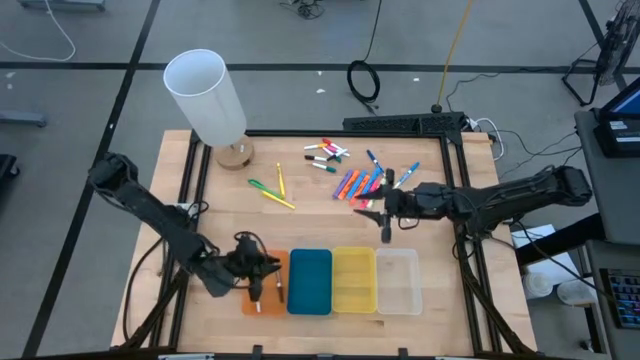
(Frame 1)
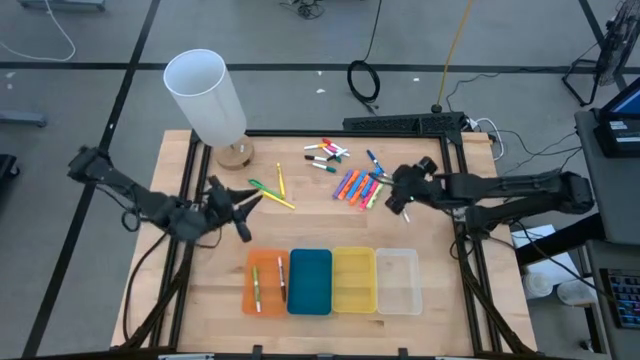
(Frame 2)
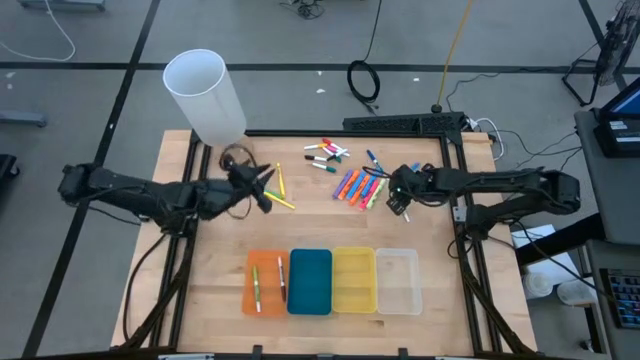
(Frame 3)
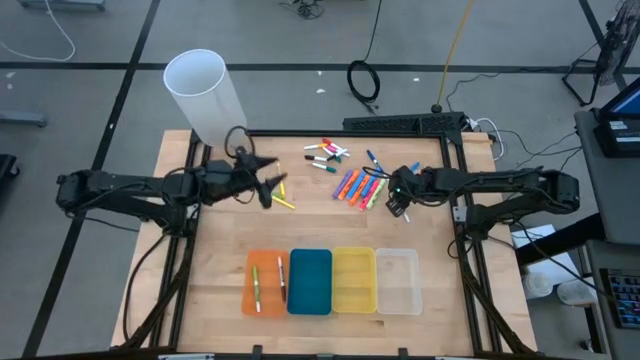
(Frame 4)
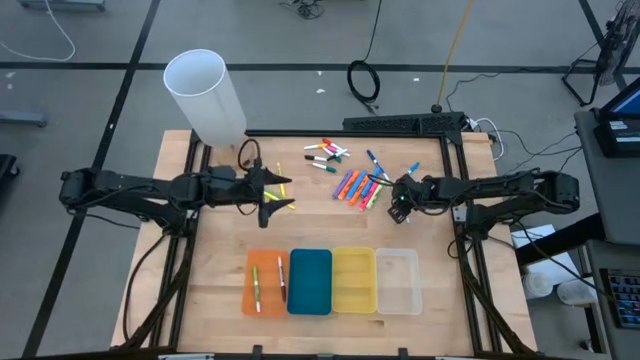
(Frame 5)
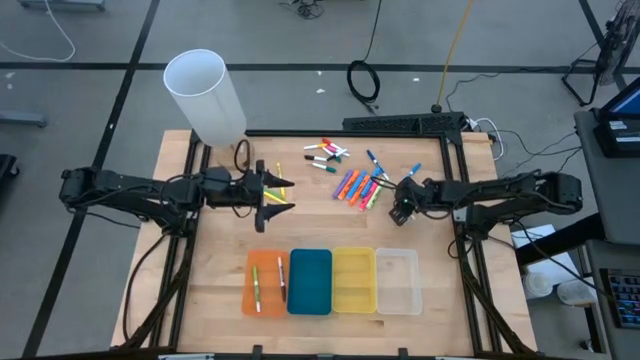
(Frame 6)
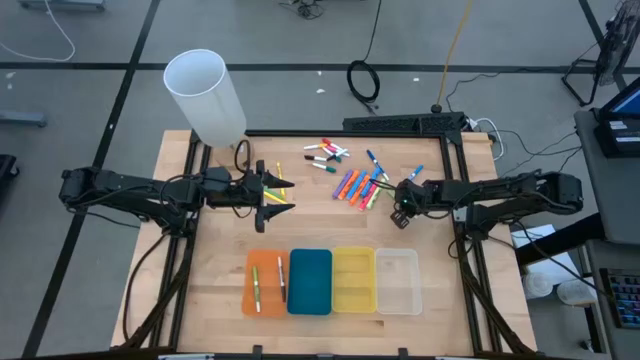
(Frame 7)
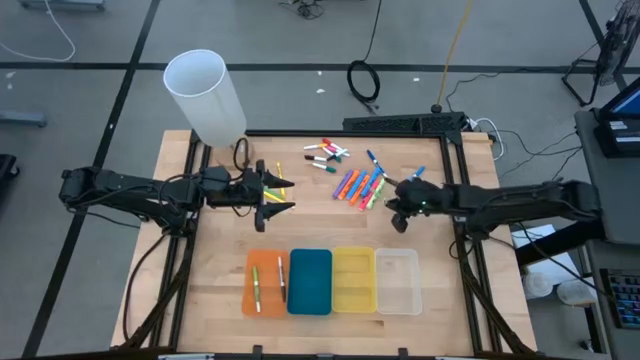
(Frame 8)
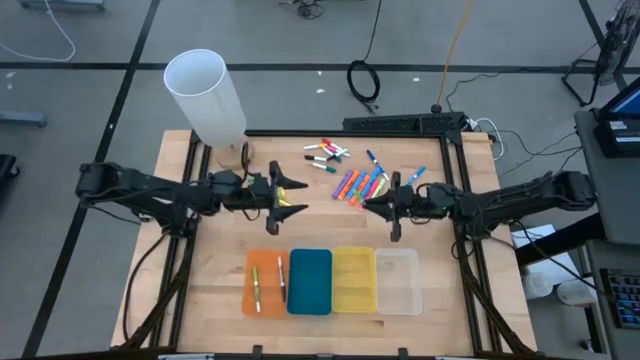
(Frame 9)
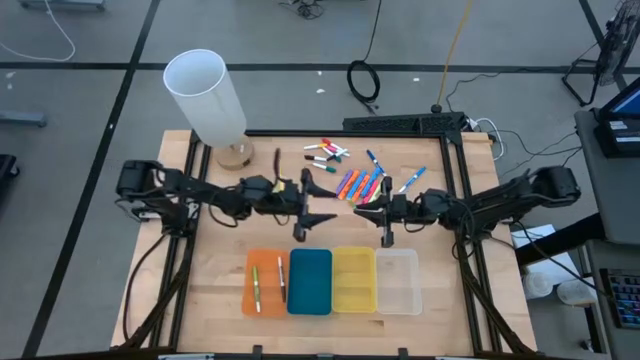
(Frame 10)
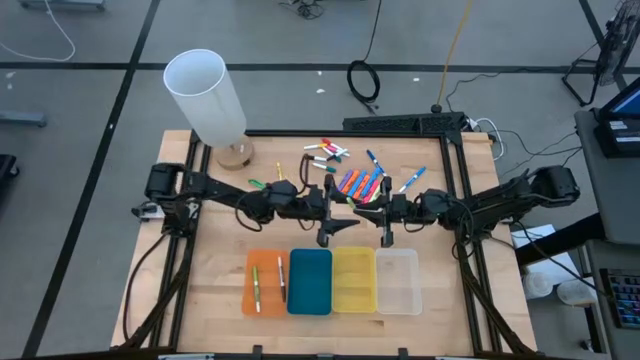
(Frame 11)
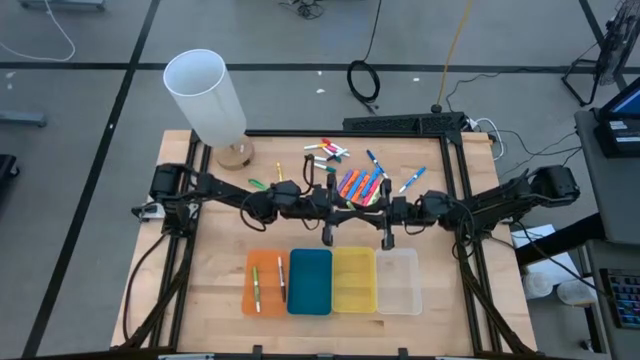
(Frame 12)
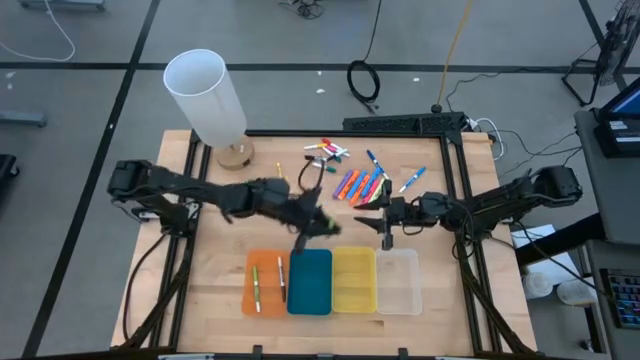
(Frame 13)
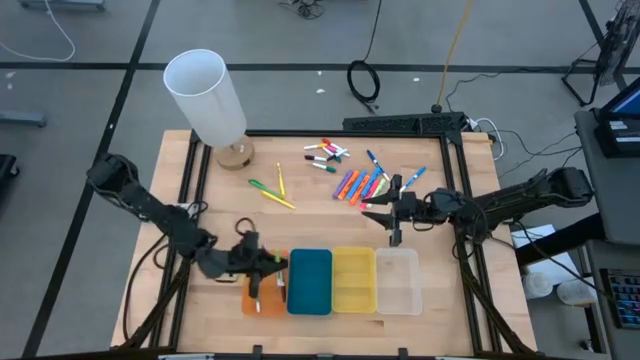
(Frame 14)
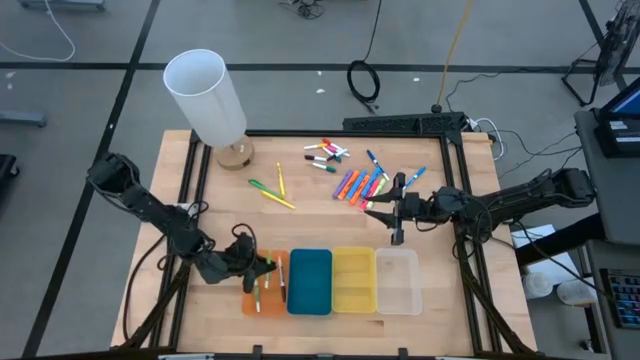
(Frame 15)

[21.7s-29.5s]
Task: Pick & Place Markers
Put the green marker pen into the orange bin

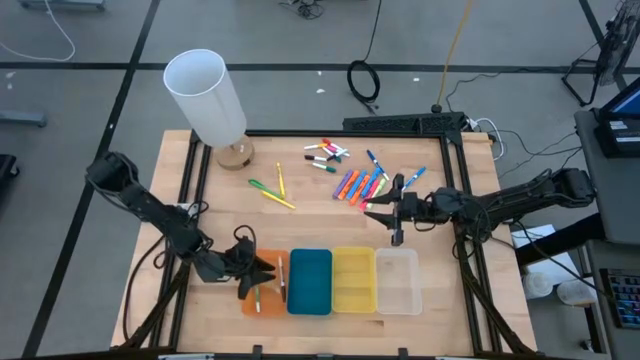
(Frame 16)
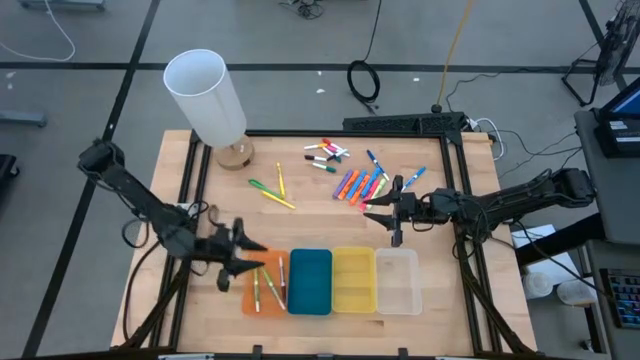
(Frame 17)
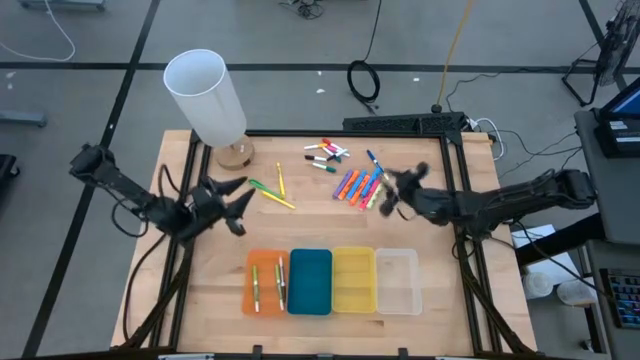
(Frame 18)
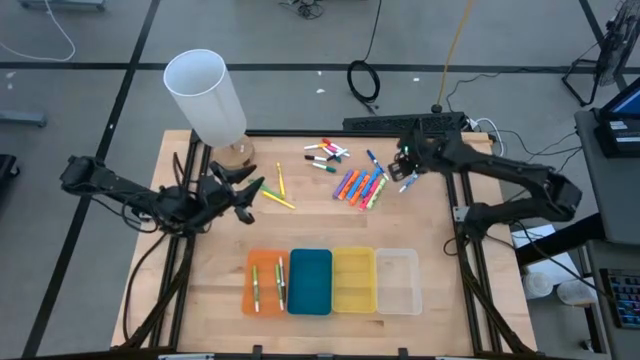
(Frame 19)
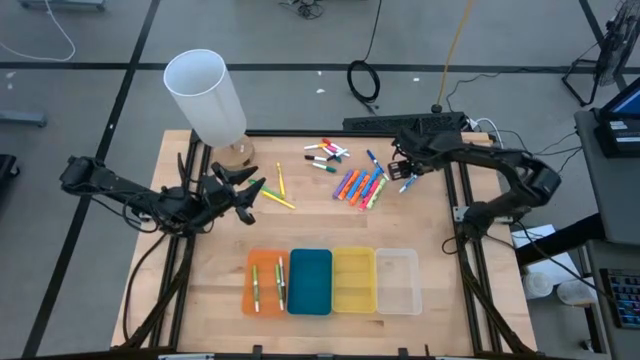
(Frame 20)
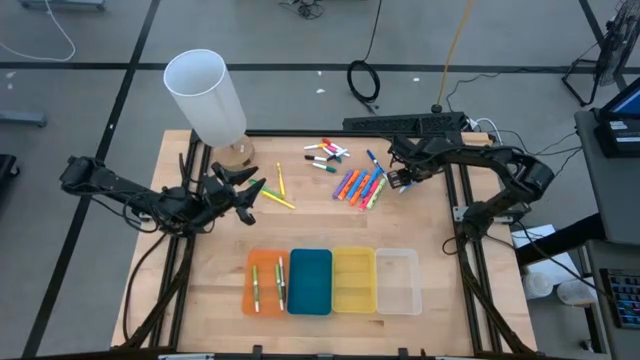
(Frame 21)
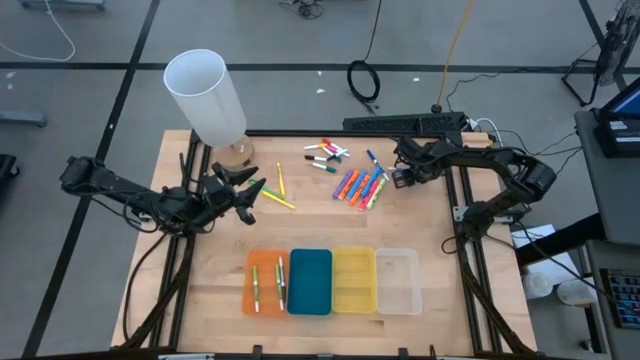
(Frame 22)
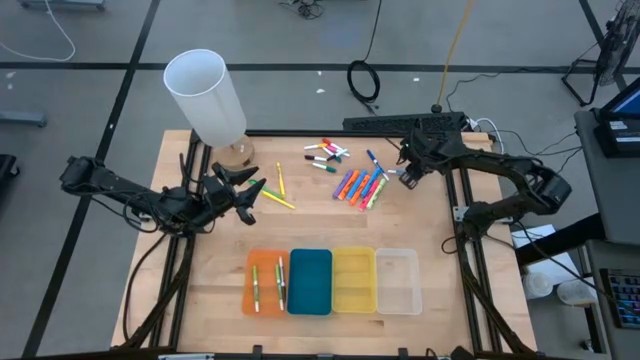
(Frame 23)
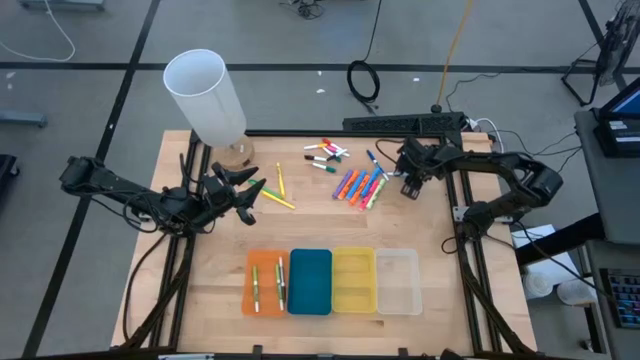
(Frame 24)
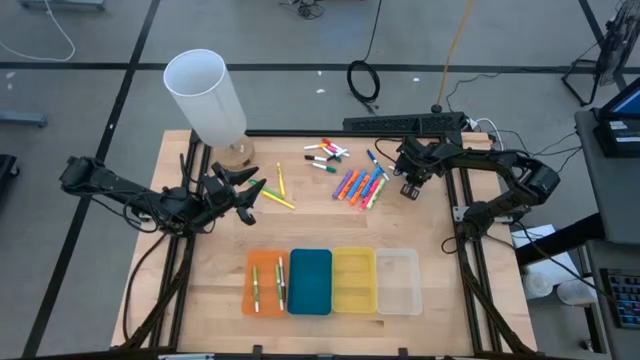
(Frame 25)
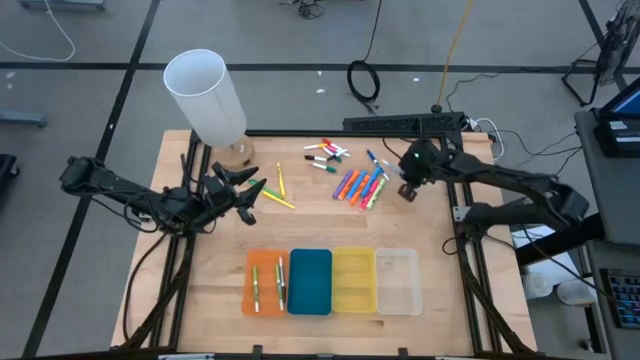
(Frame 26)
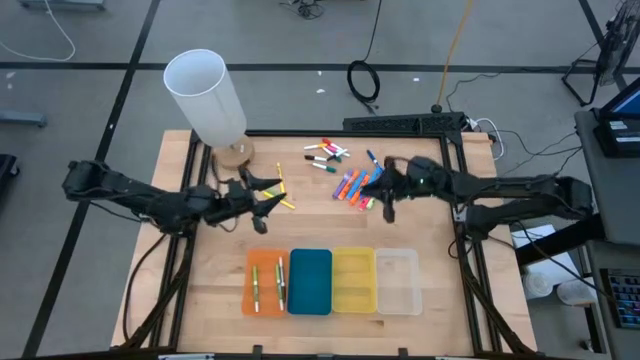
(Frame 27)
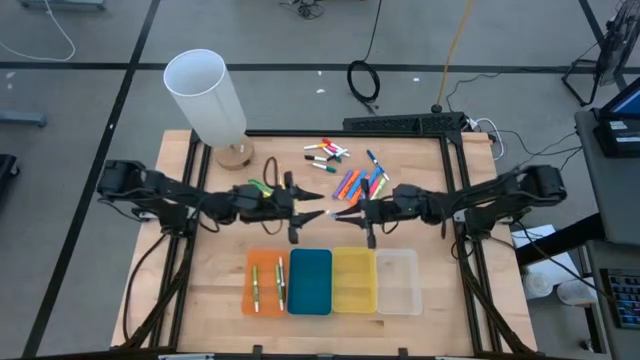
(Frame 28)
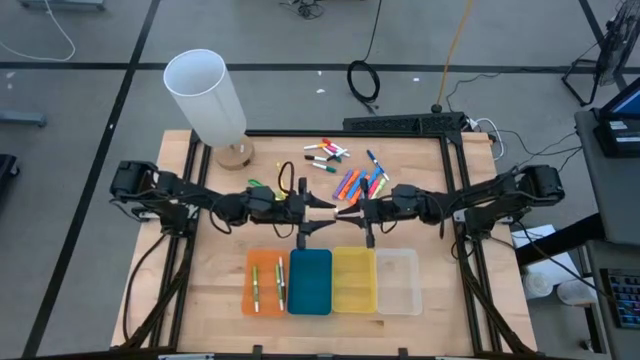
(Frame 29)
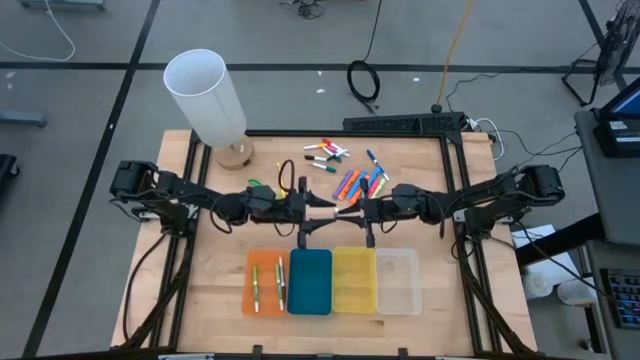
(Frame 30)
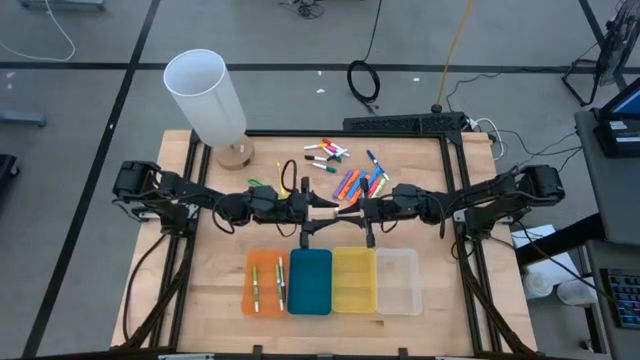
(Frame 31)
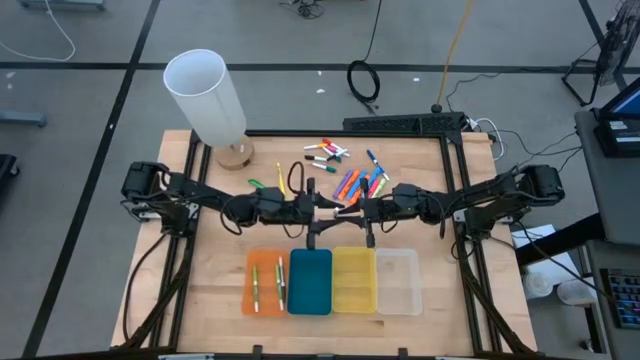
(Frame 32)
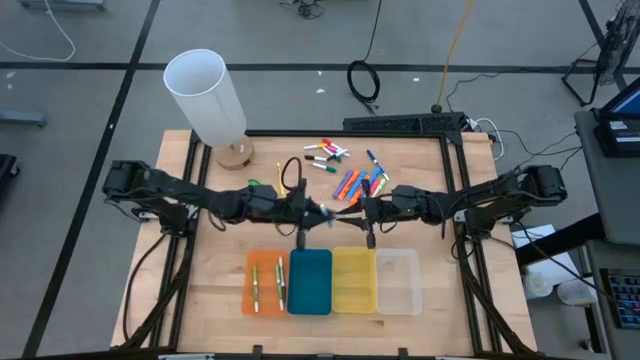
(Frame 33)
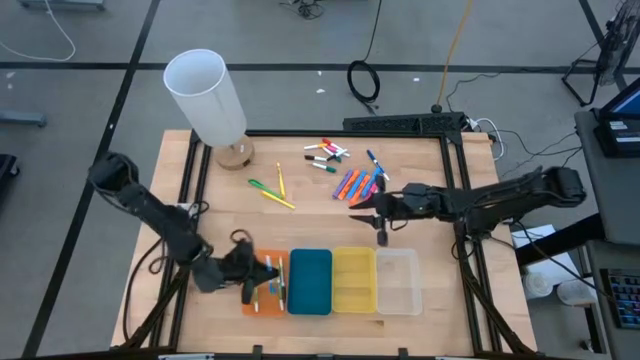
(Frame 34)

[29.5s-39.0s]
Put the light blue marker pen into the orange bin

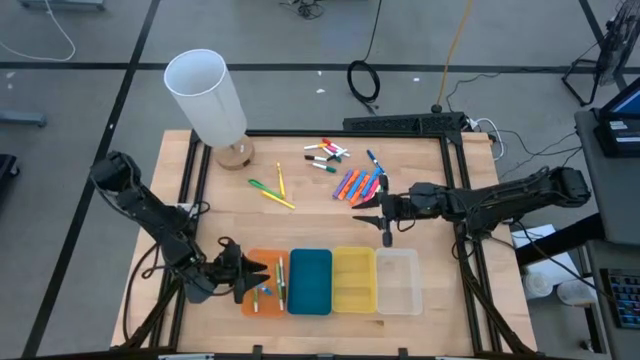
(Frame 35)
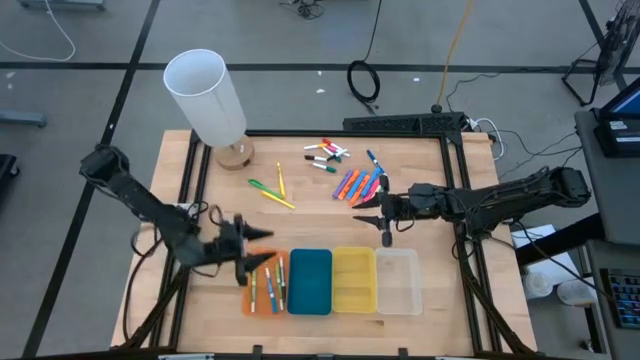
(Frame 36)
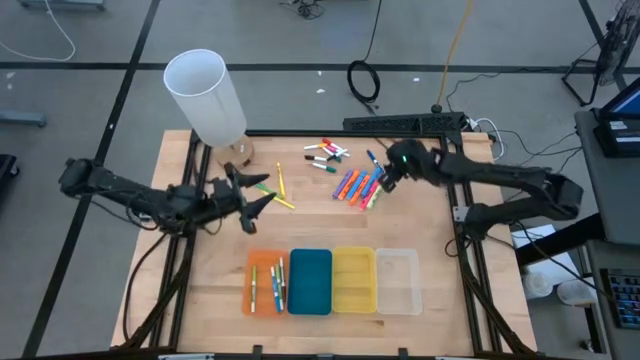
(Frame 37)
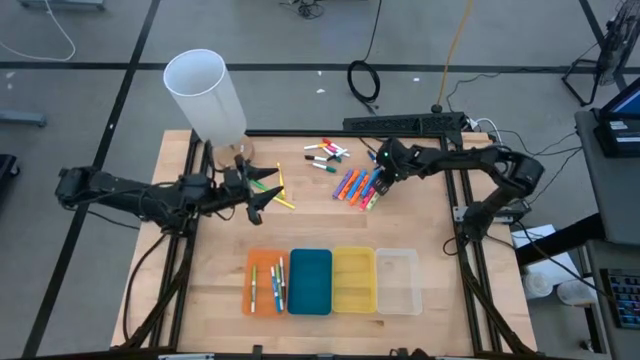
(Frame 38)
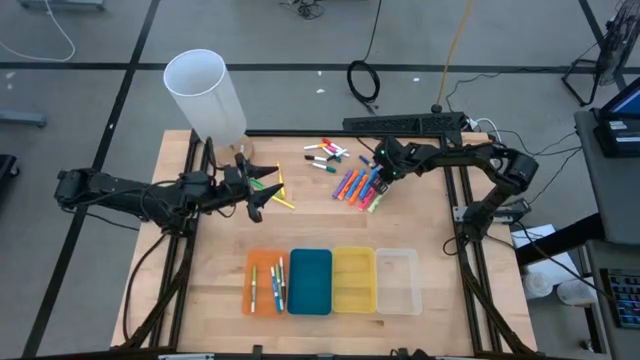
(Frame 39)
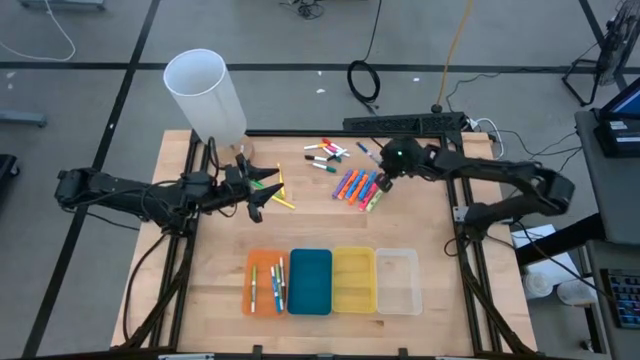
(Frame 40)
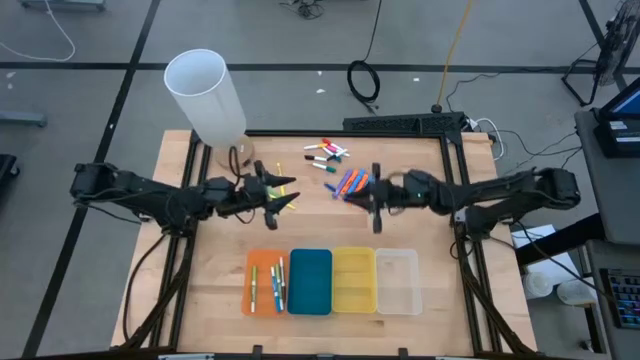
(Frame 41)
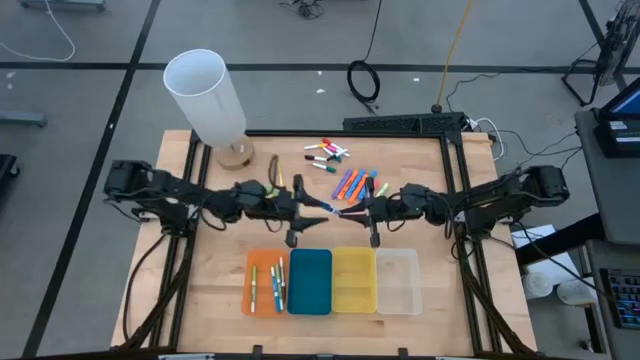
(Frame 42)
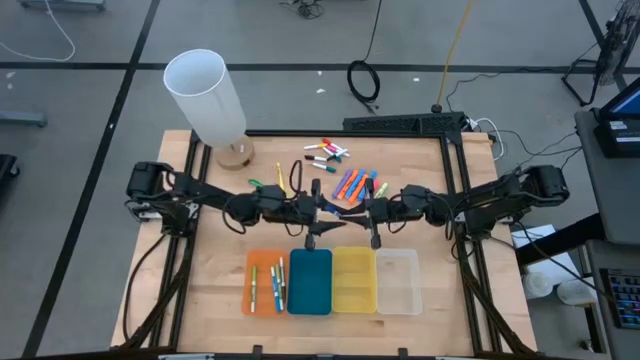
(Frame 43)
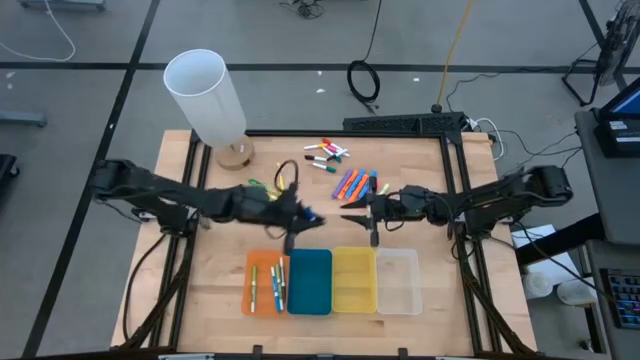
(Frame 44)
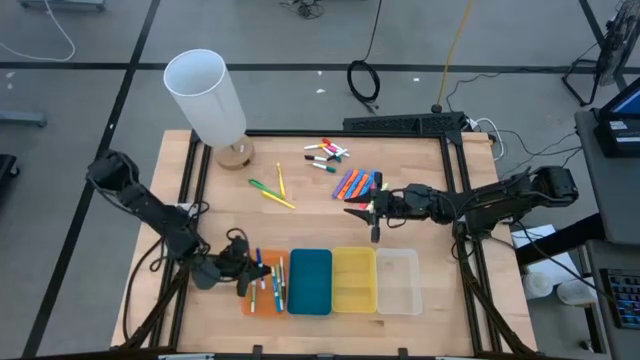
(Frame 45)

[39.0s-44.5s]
Put the blue marker pen into the orange bin
